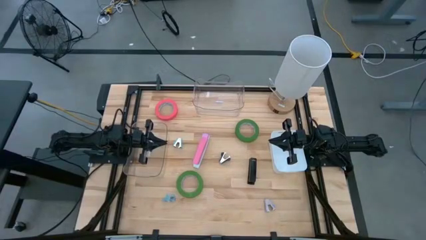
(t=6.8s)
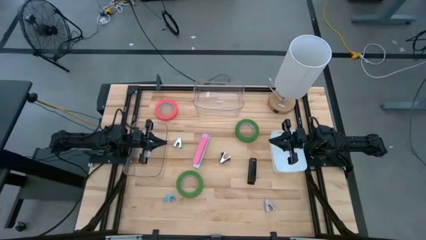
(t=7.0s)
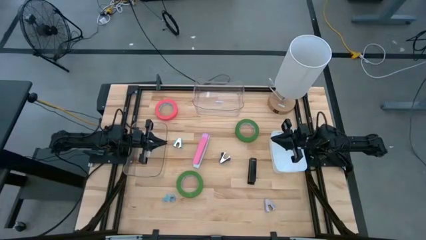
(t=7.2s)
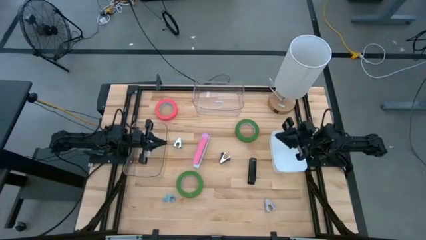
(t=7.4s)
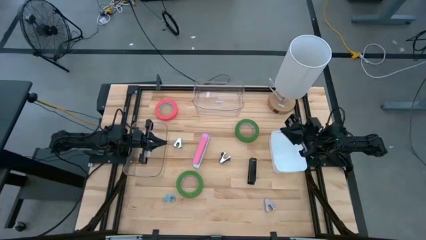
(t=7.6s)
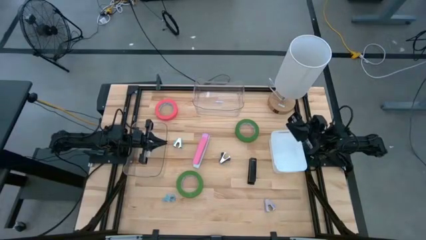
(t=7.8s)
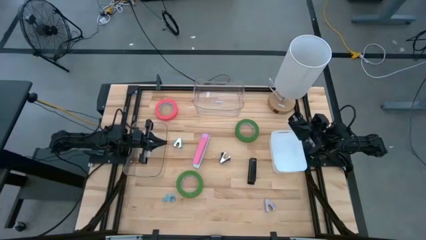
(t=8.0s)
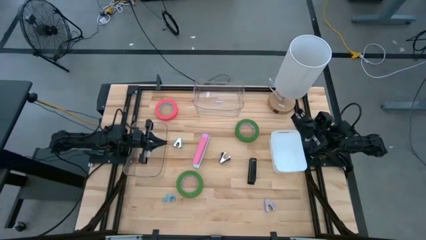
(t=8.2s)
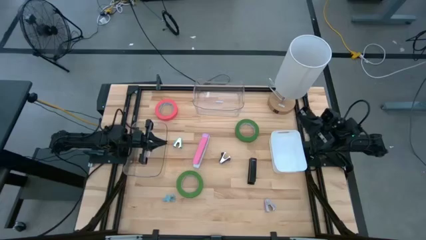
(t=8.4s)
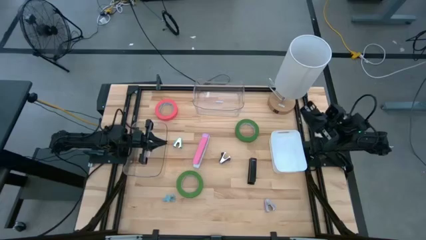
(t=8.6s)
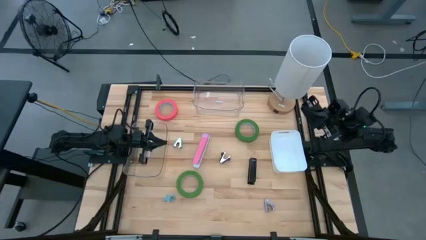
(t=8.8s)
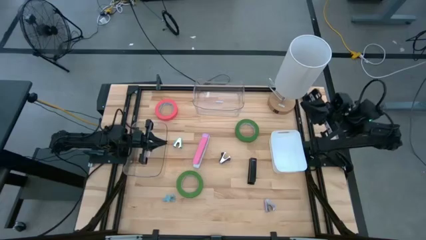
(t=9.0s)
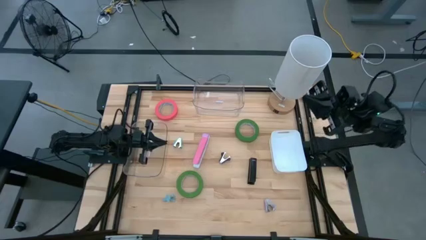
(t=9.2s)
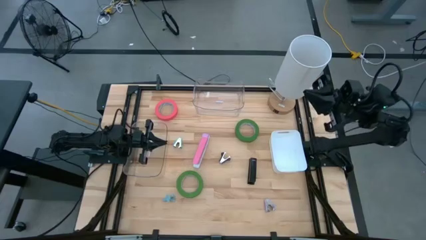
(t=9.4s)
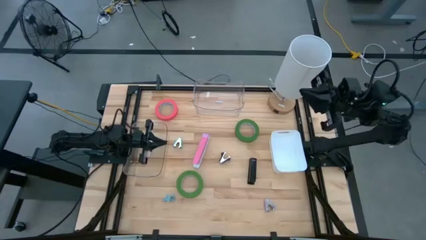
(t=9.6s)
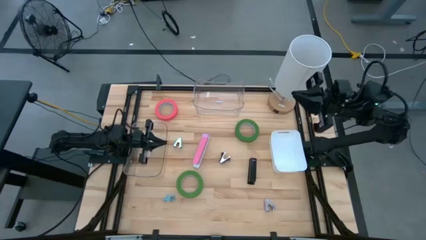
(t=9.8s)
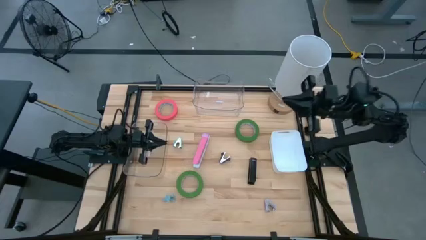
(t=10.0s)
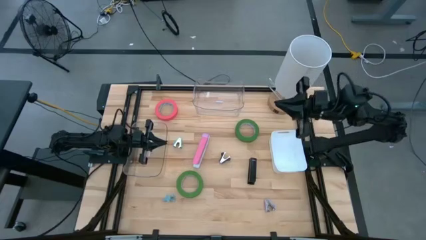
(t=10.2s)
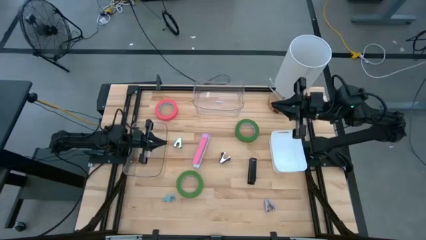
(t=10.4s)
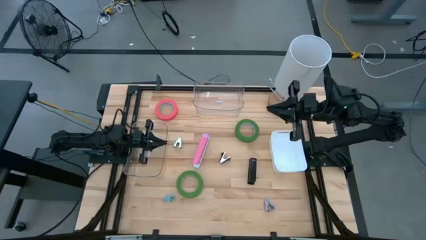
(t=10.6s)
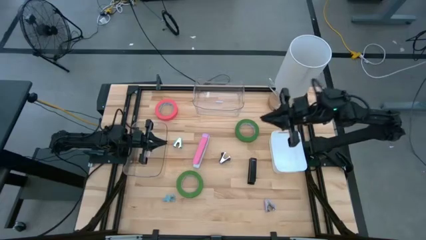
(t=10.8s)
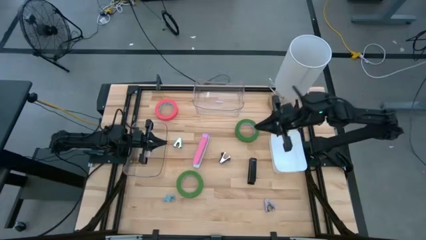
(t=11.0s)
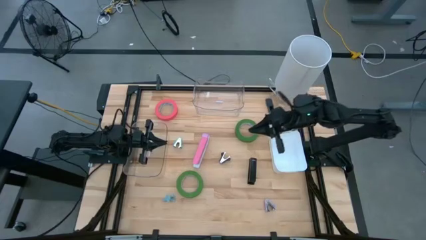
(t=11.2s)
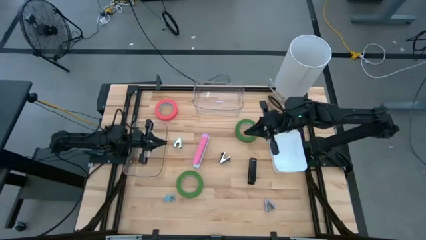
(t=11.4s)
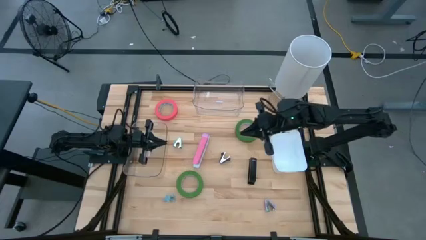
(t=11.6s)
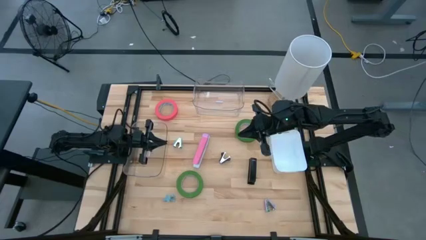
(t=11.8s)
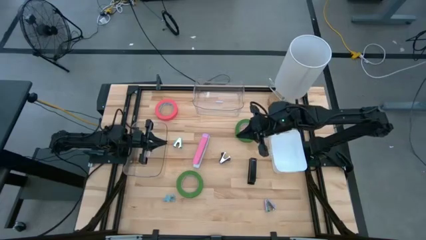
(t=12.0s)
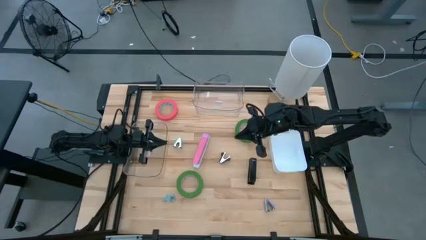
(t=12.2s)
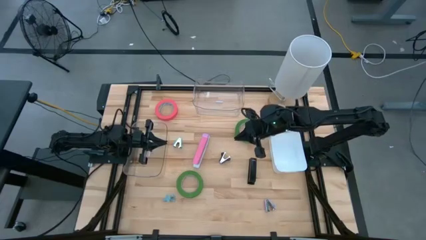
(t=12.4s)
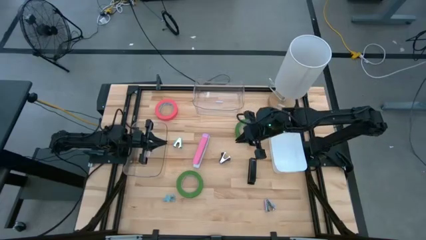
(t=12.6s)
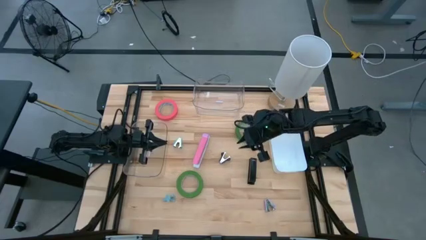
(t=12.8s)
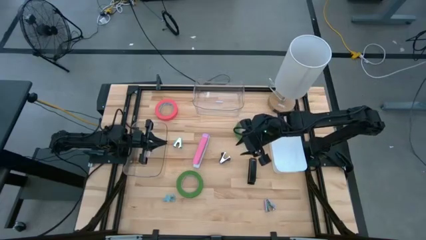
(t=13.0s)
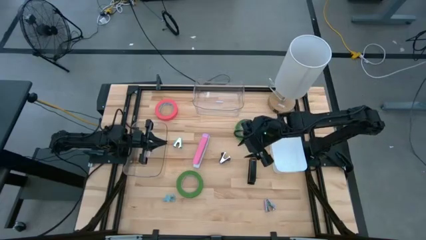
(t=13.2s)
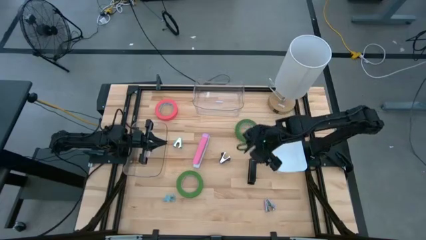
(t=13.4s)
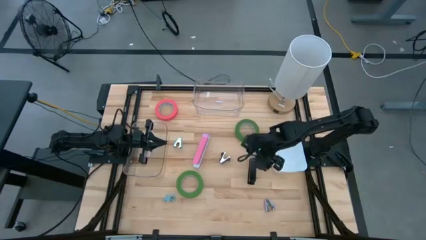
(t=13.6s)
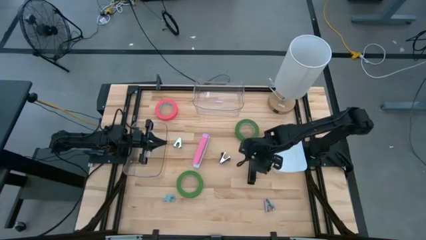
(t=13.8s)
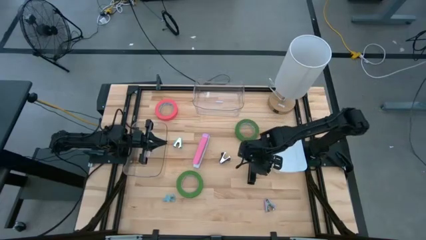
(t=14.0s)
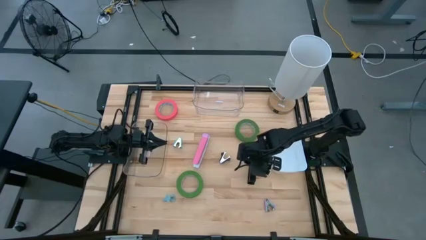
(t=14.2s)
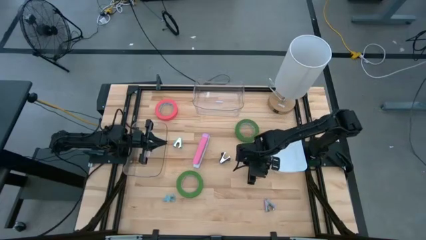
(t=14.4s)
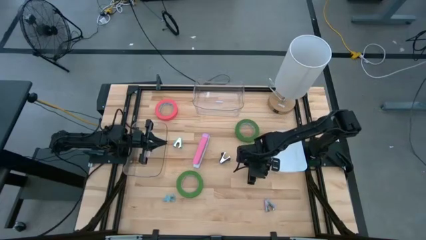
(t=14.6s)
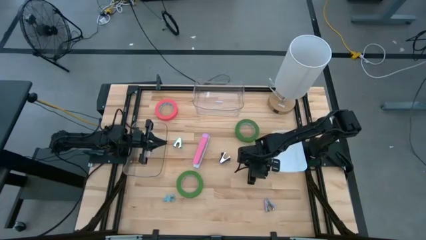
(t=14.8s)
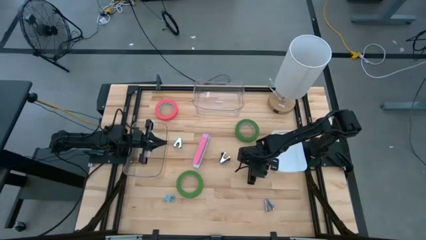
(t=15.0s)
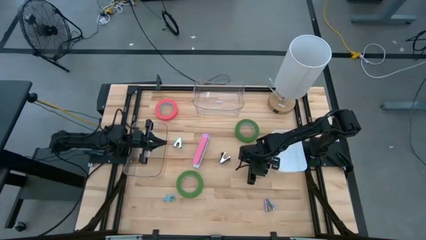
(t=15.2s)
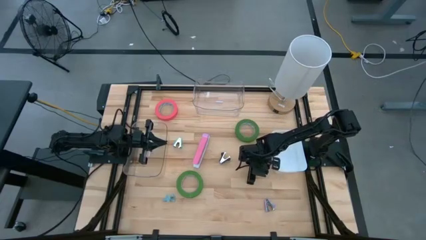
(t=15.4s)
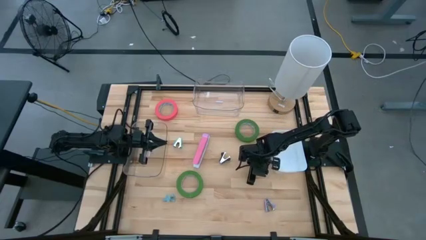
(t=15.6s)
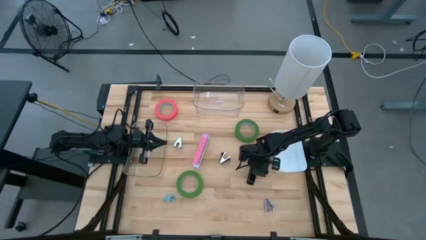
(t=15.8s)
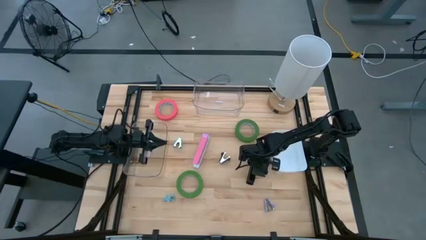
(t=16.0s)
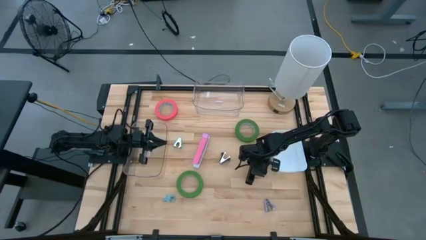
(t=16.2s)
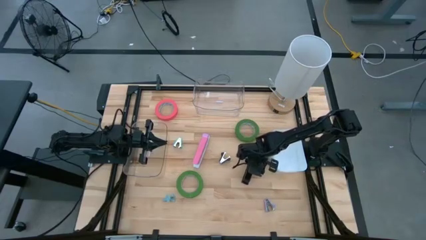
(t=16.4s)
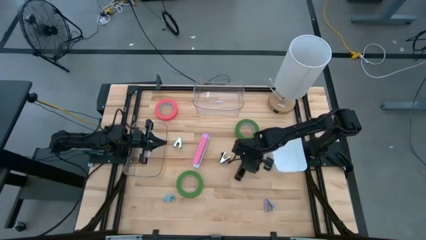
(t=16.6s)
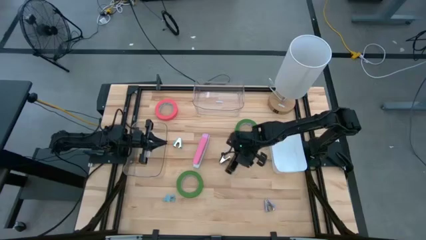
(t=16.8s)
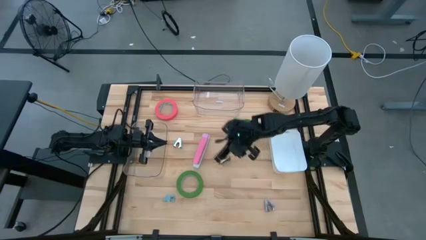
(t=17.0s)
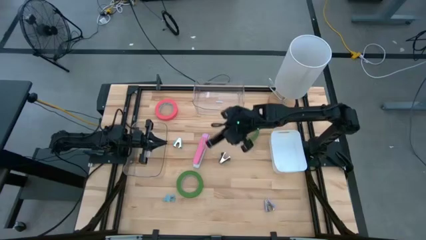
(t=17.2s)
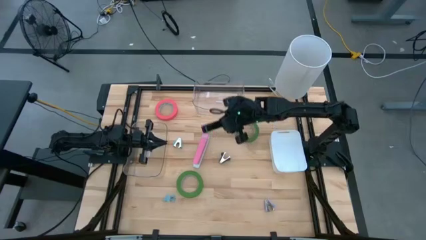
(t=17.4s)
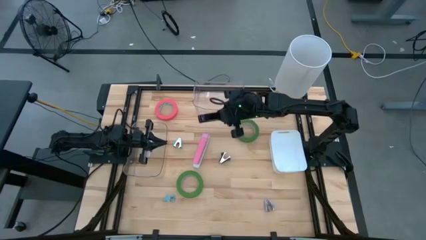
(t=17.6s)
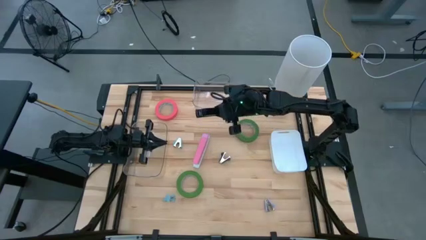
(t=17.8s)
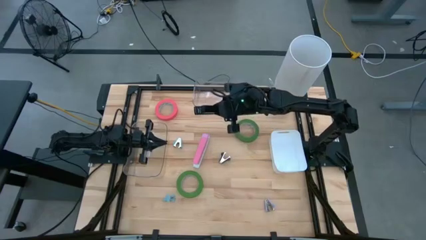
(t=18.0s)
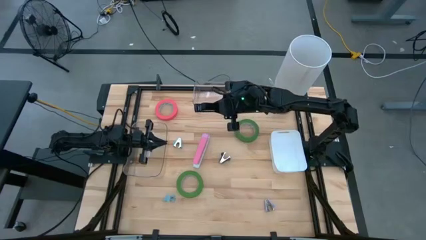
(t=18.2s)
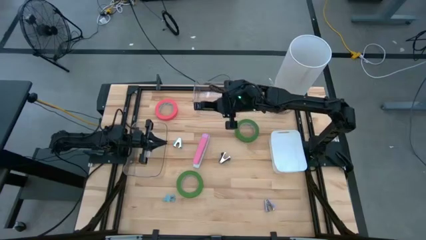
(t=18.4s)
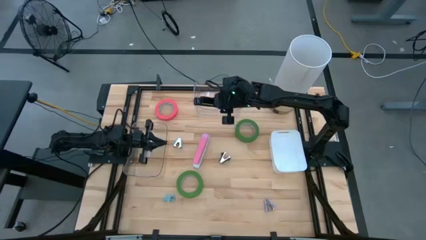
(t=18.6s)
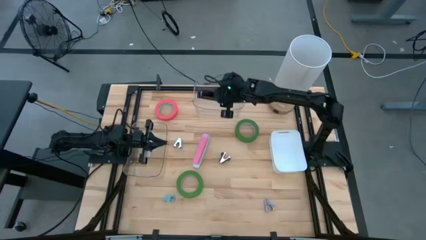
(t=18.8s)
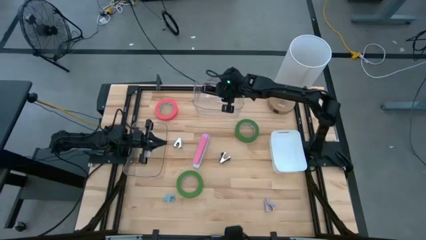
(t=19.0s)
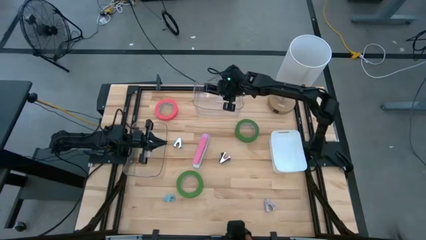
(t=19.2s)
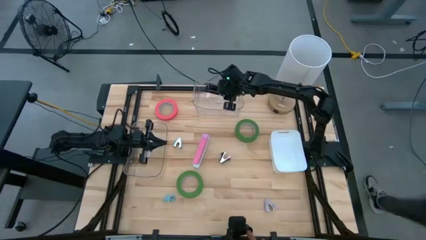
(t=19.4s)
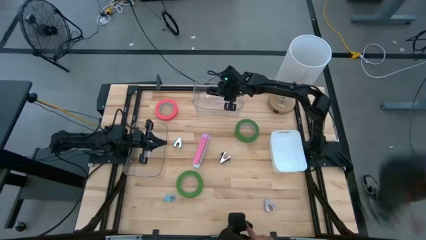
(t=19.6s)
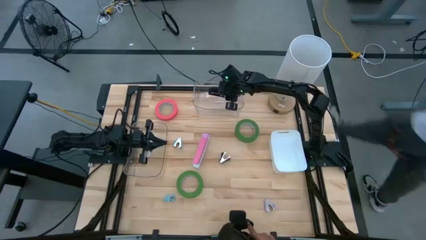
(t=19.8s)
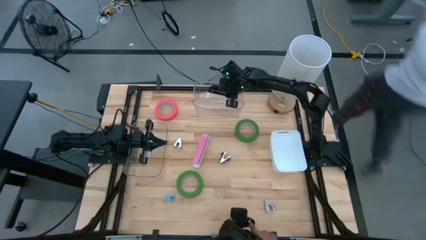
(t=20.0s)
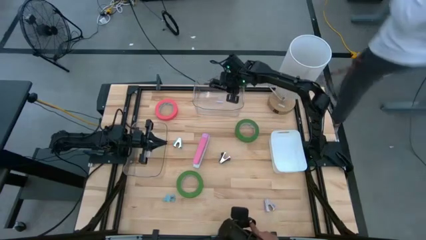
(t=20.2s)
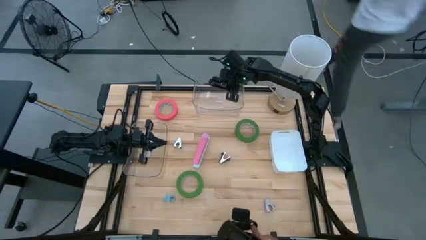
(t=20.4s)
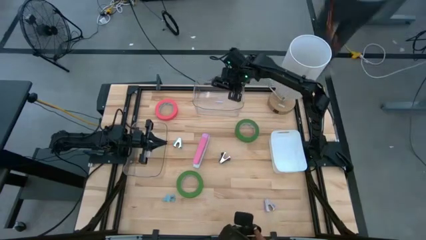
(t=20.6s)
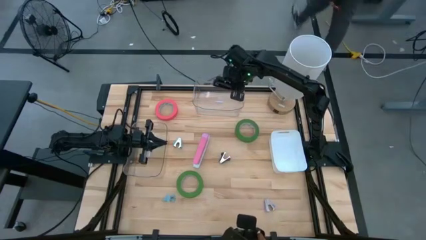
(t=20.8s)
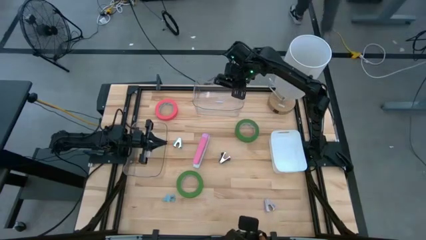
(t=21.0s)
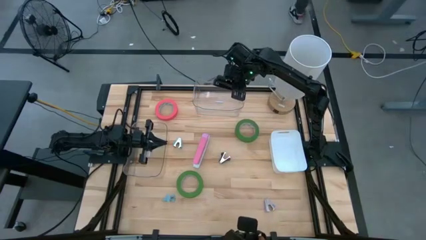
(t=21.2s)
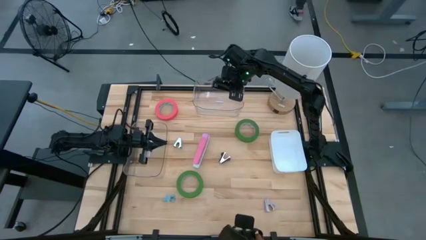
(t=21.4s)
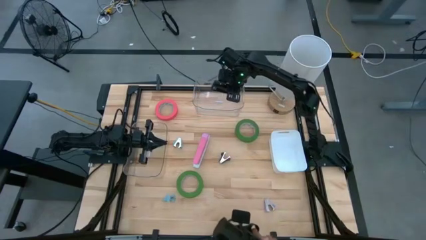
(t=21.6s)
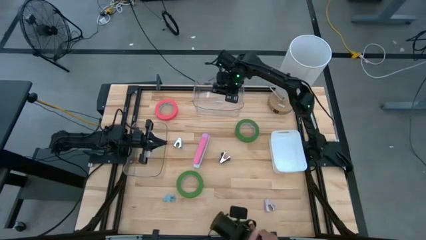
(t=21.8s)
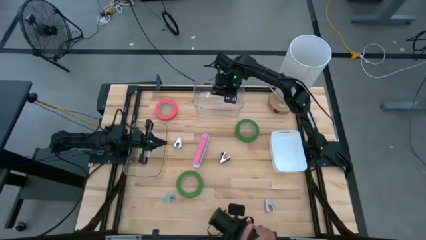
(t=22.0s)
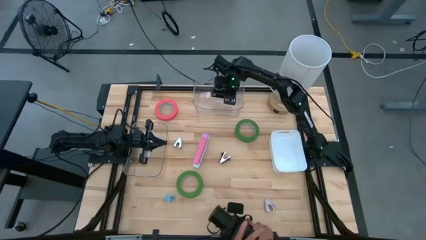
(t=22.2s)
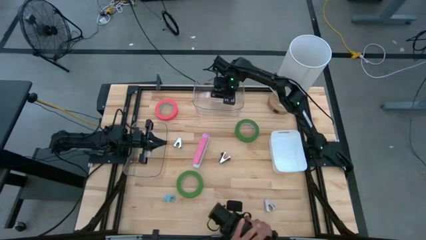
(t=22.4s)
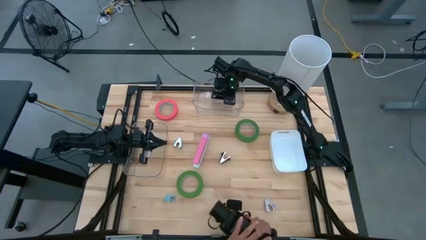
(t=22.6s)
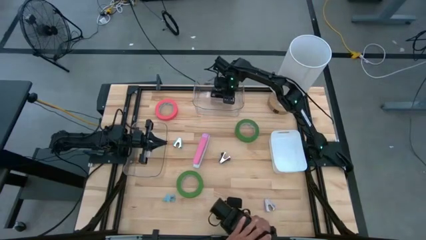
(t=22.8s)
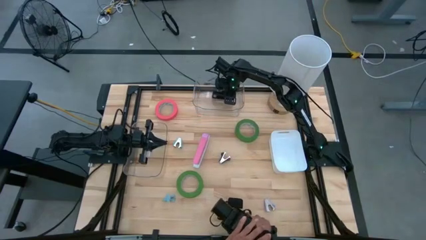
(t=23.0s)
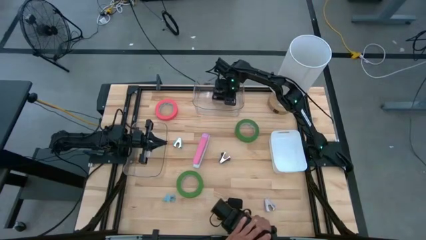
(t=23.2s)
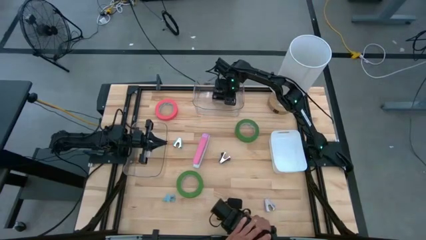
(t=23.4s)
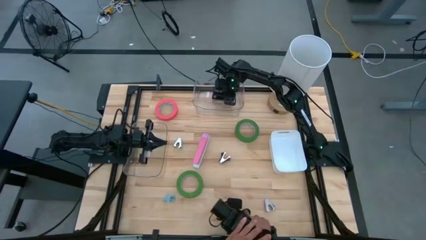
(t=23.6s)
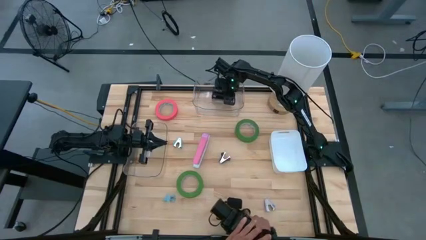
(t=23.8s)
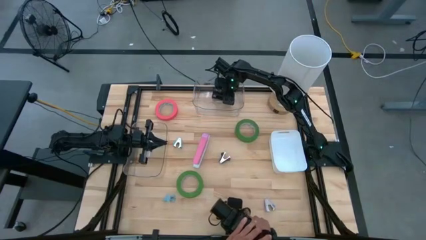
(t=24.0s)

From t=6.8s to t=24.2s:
Task: Pick and place Stapler, Stapler remover, tape
Put the black stapler into the top transparent bin
